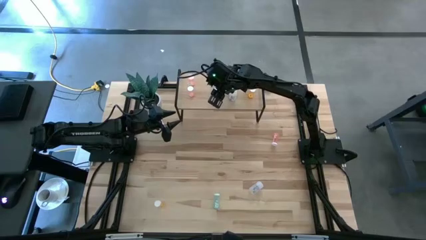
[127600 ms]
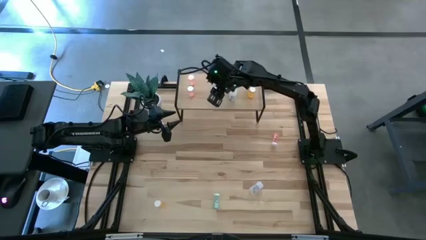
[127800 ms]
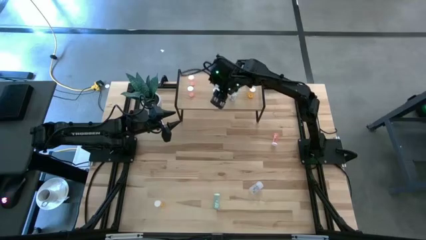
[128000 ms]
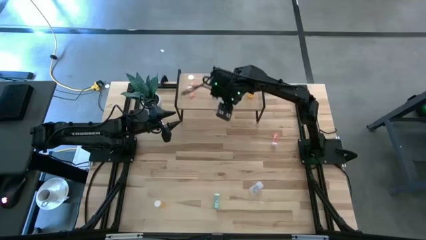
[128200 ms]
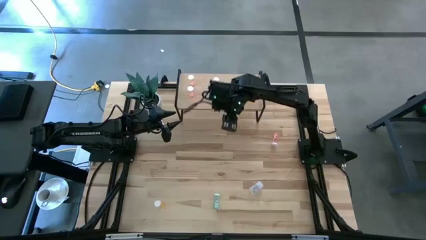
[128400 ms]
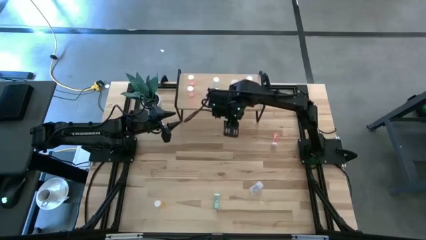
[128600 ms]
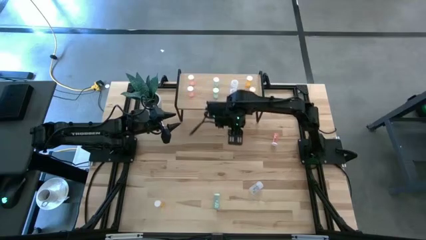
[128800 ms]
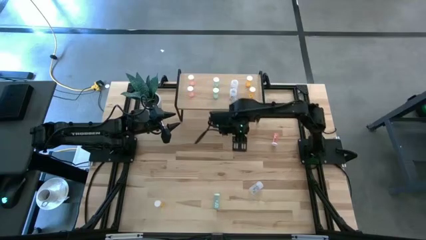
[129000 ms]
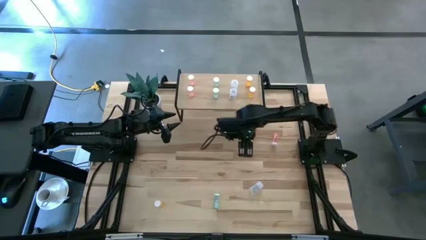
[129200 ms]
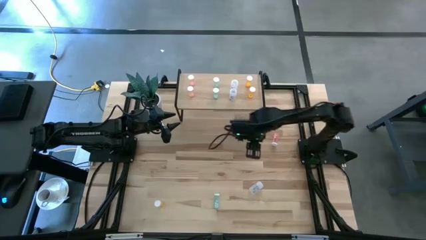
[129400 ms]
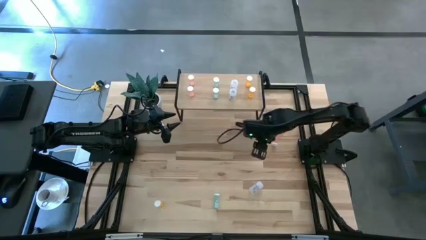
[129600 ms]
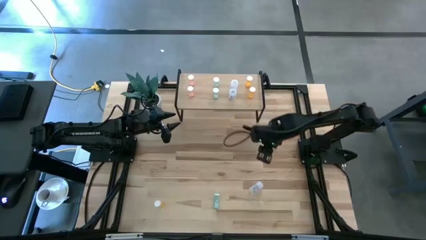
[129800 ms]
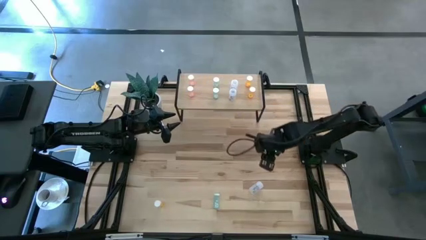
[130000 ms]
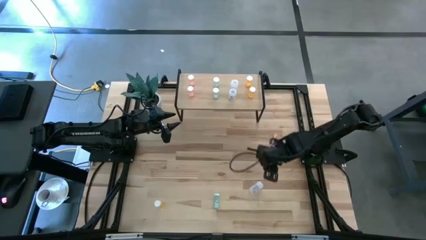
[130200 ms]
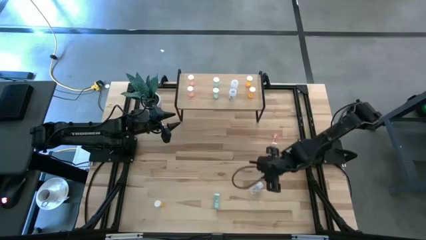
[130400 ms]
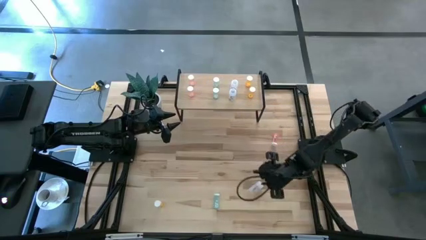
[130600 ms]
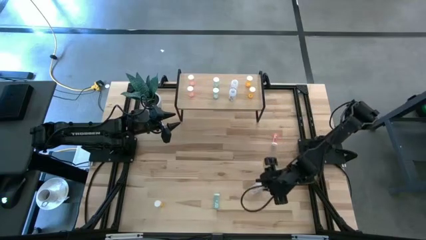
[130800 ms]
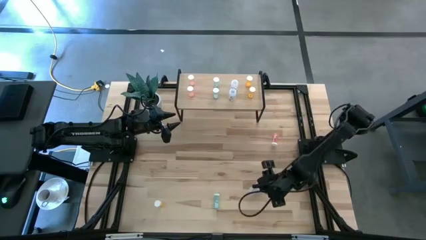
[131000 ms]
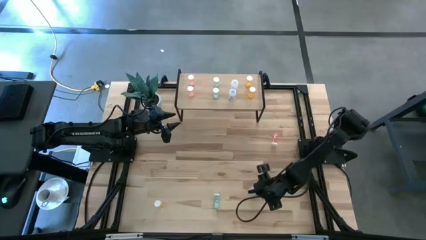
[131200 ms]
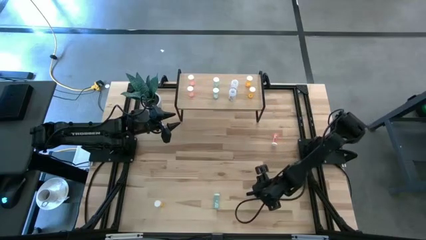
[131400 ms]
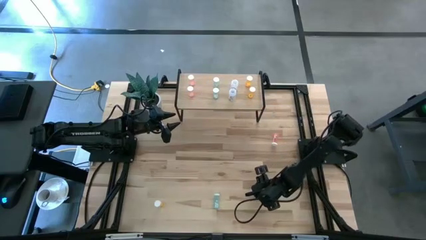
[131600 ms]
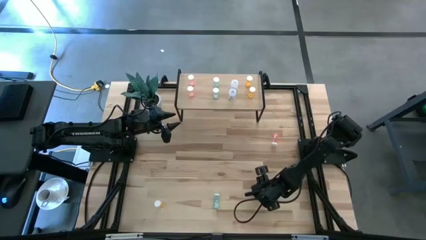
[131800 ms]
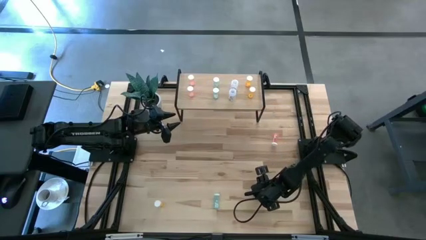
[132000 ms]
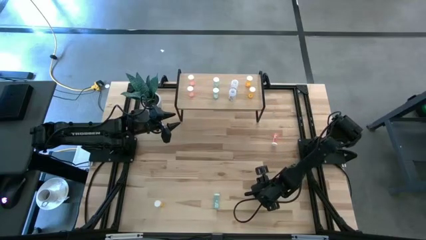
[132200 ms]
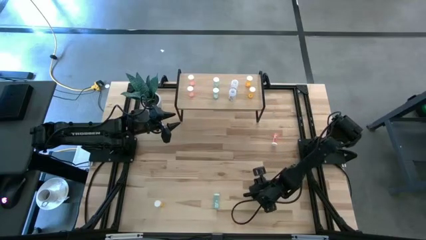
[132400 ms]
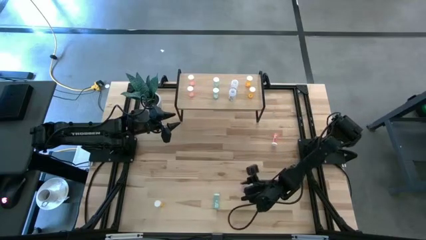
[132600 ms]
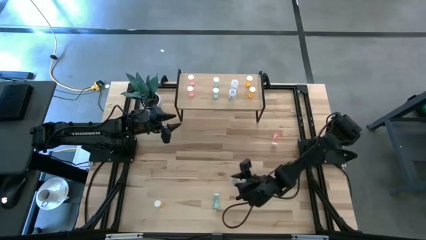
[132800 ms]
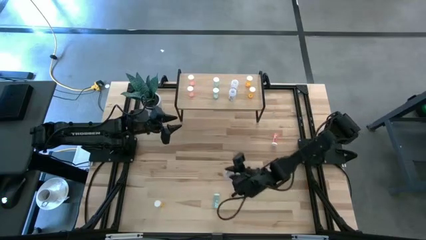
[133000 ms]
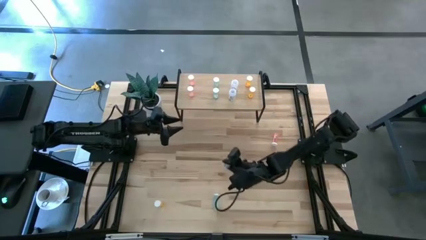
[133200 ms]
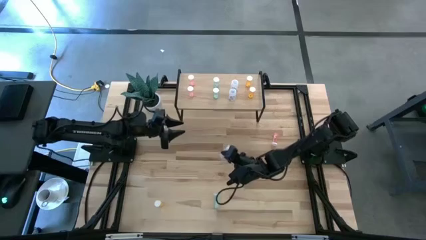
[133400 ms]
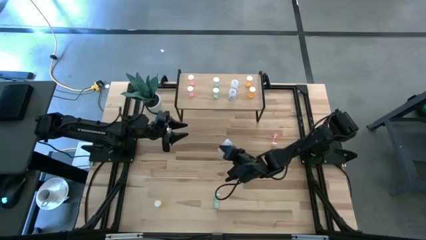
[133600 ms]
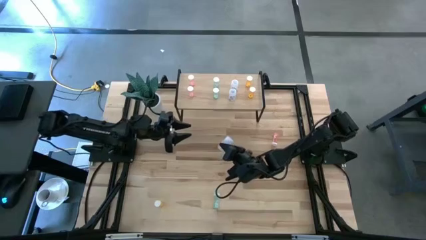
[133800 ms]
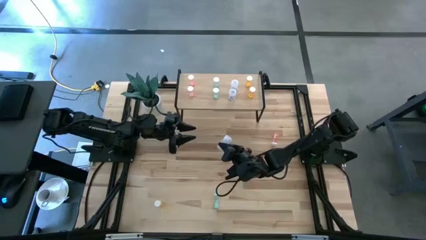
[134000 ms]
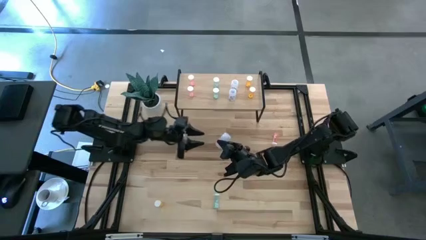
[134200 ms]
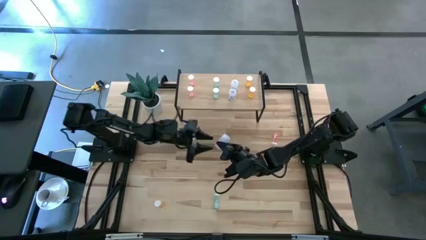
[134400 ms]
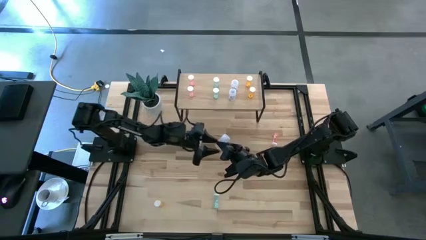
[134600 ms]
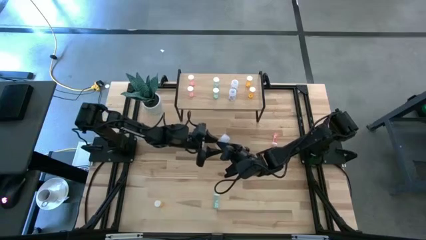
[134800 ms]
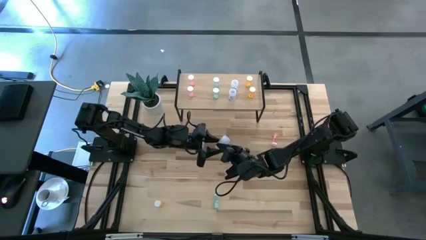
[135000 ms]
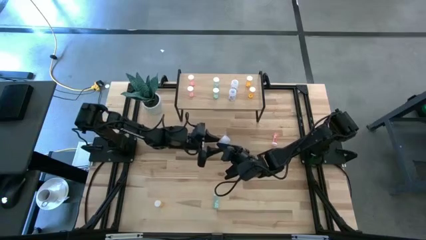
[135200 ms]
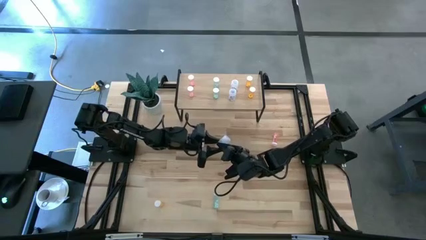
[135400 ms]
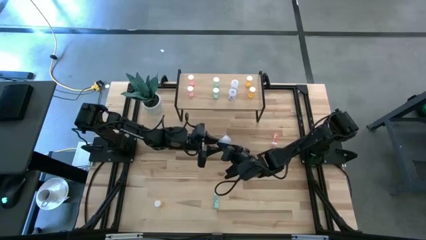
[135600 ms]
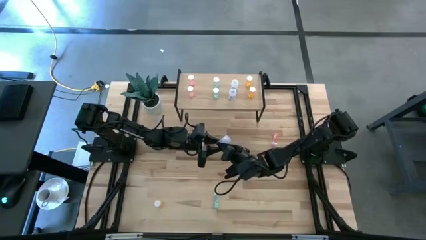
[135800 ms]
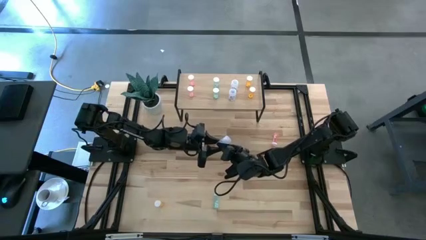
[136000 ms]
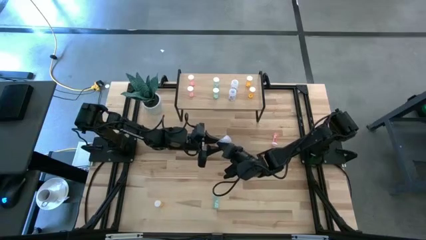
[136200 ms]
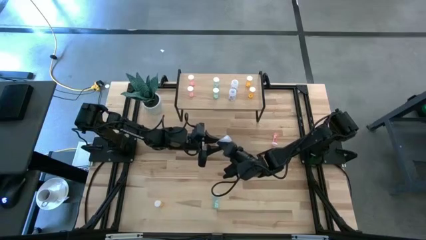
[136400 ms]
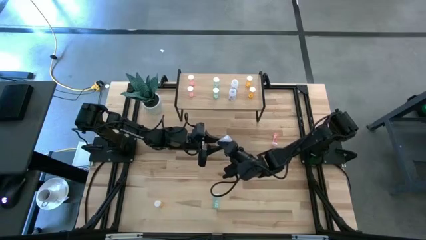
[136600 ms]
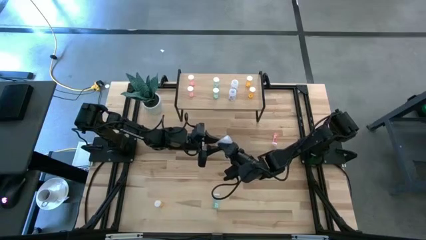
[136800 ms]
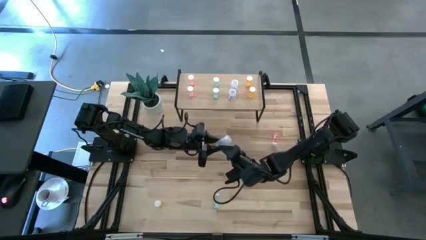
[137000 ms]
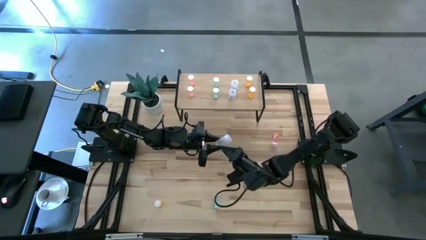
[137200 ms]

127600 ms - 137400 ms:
Task: Pick and place medicine bottles onto shelf by color
Put the transparent pill bottle aligned with the other transparent pill bottles on the shelf

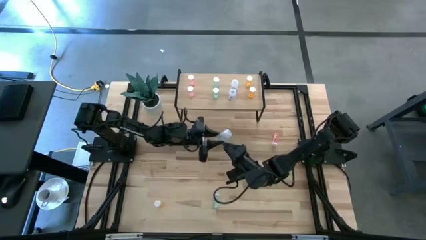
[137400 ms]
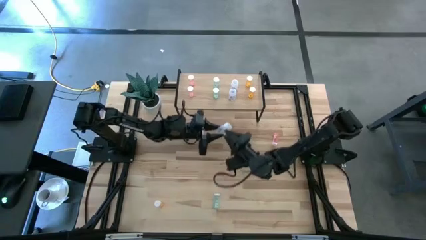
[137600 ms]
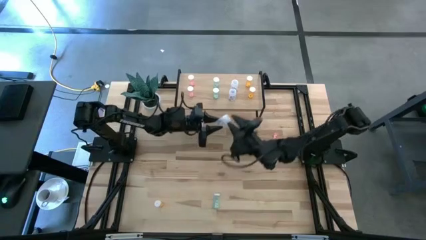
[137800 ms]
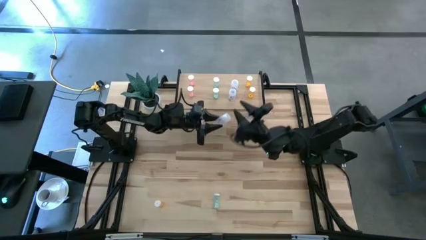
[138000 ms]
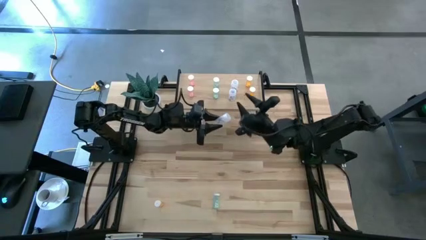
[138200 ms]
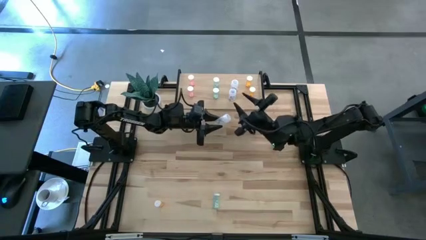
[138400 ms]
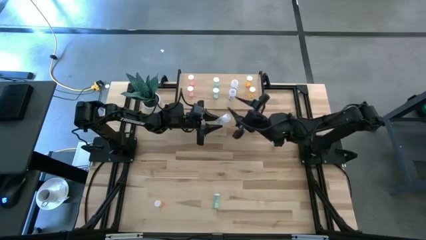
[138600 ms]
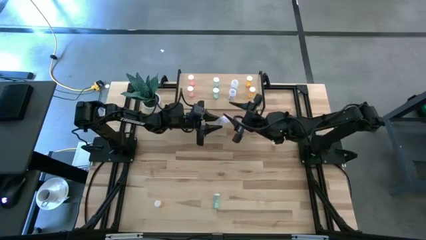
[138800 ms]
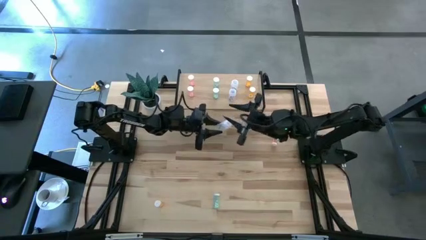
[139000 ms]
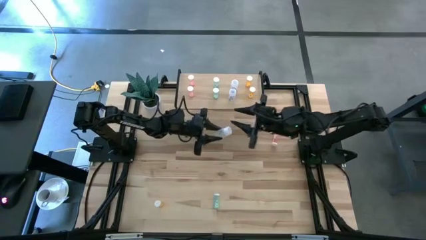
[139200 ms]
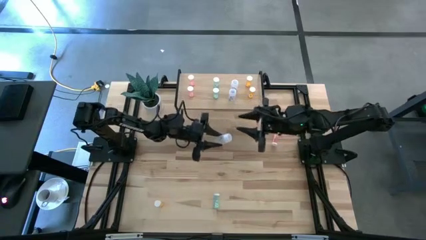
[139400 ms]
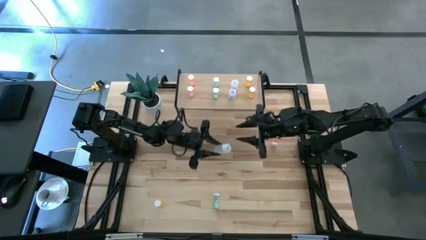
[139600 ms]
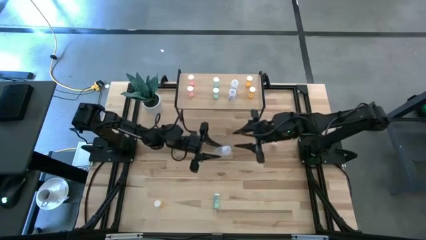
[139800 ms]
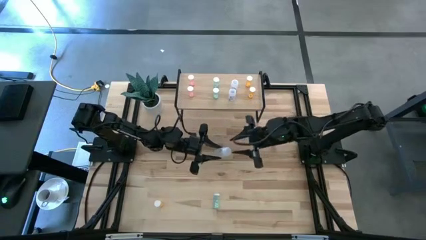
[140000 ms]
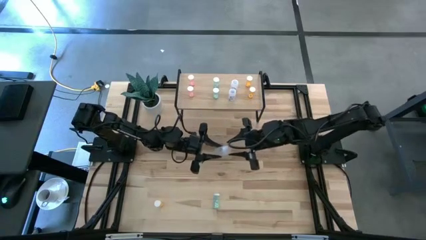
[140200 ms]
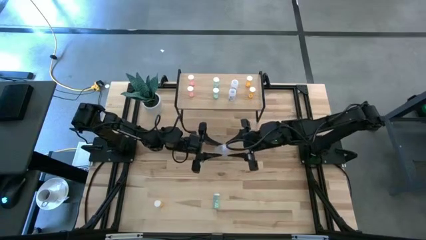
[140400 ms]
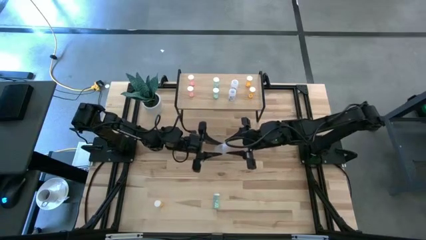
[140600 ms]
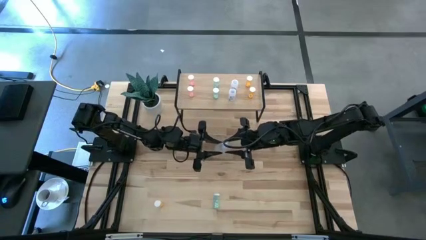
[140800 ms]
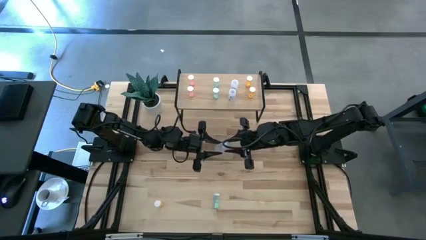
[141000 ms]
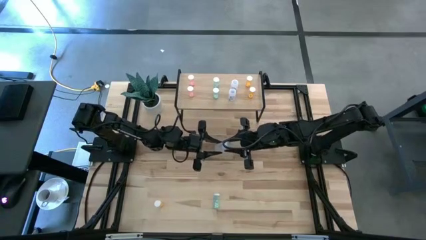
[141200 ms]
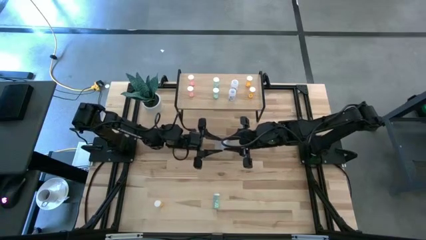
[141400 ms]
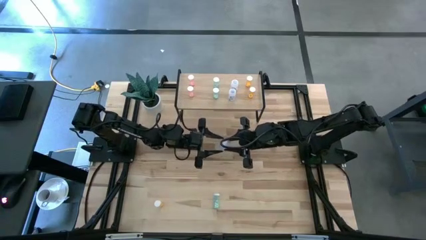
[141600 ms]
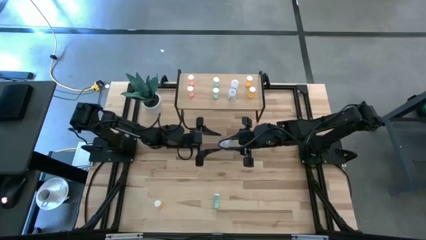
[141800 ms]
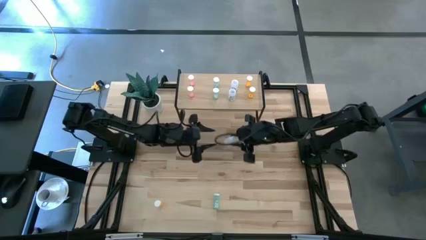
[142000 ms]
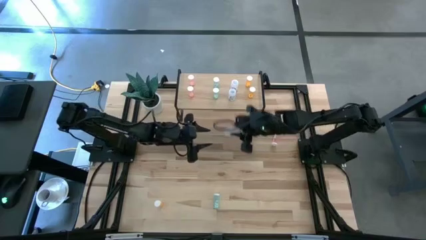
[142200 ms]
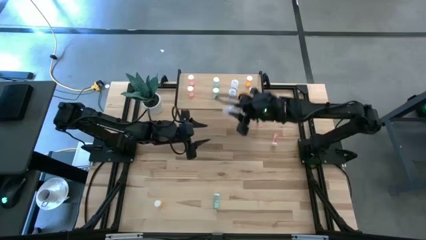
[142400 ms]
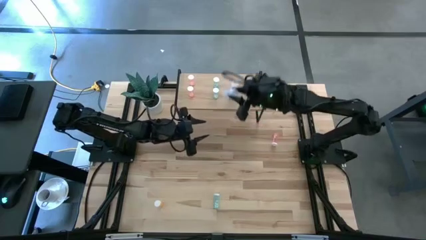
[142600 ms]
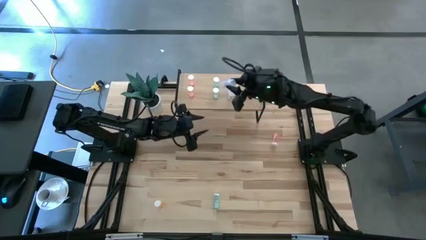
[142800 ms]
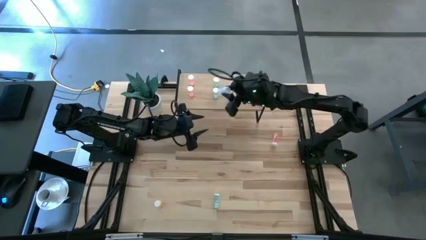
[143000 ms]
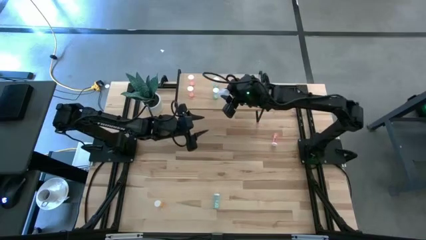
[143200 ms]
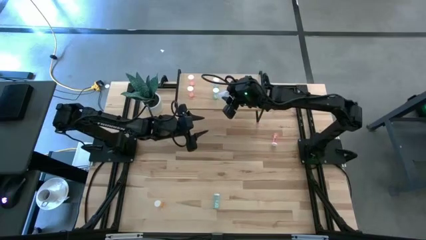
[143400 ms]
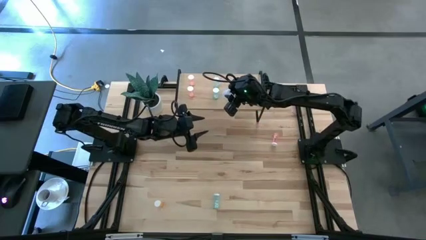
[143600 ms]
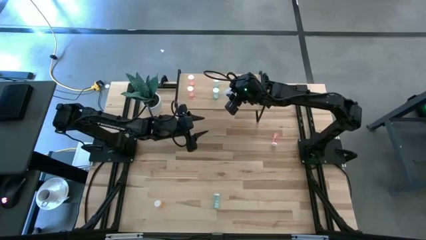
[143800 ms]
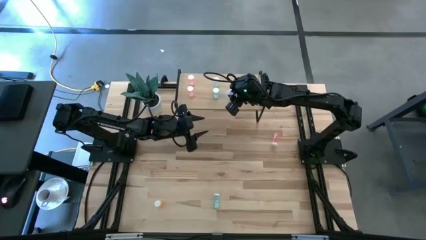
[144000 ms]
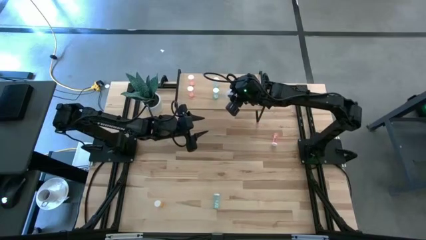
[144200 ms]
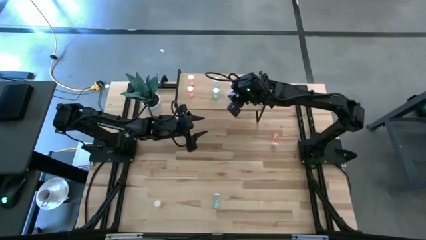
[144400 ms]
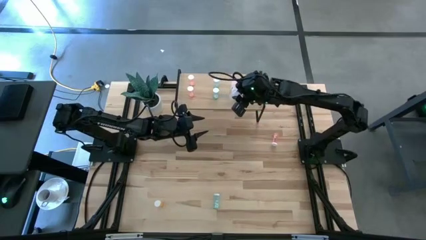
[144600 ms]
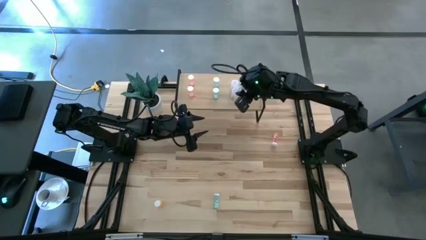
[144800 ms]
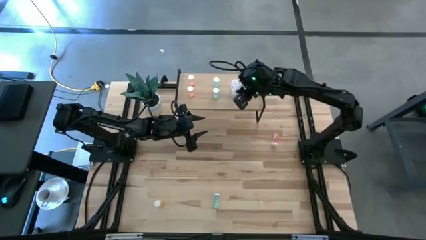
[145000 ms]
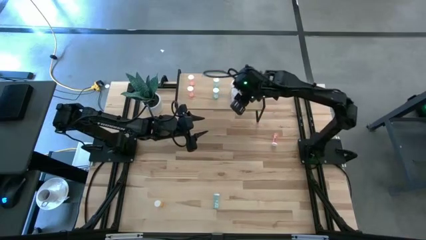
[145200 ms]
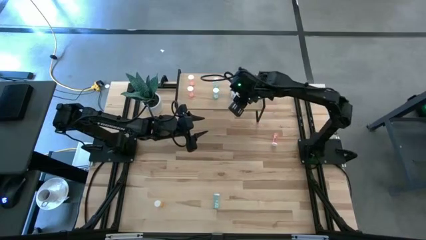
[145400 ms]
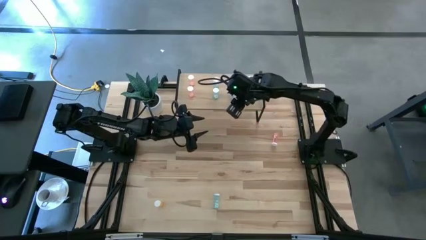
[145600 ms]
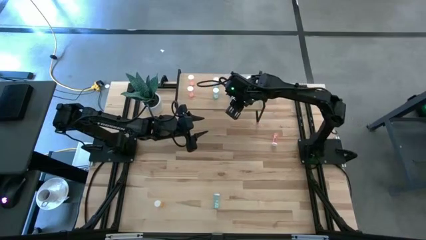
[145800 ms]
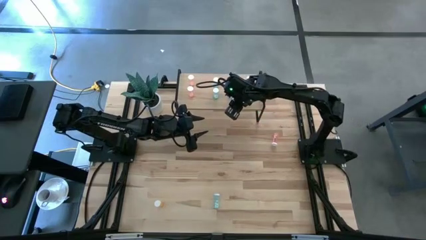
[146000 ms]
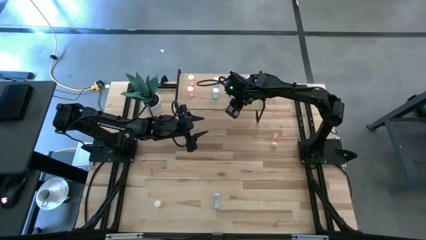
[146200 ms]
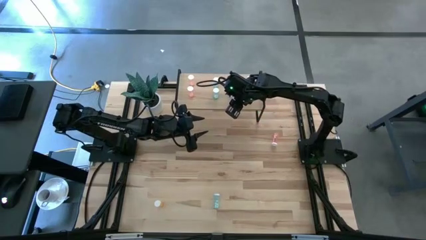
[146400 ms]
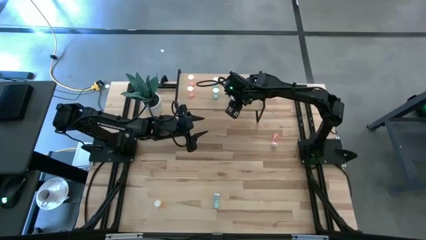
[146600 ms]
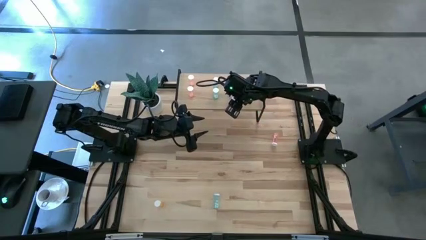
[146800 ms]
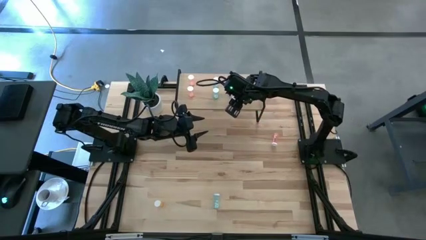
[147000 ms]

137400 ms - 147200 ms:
Put the transparent pill bottle aligned with the other transparent pill bottles on the shelf
